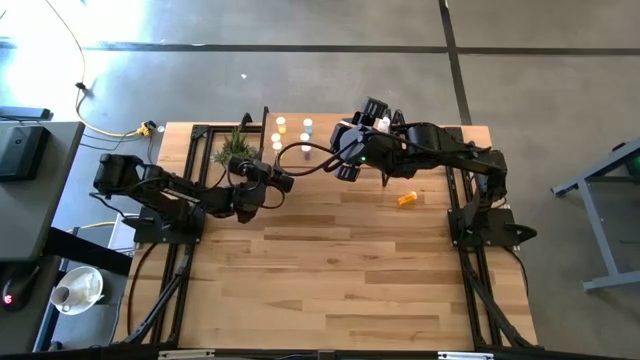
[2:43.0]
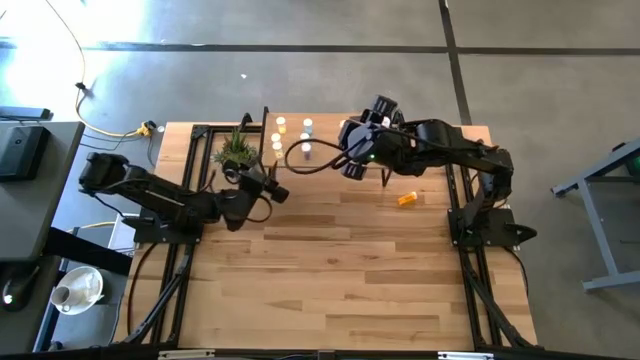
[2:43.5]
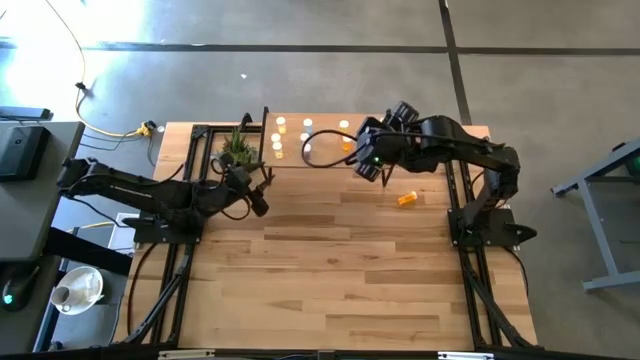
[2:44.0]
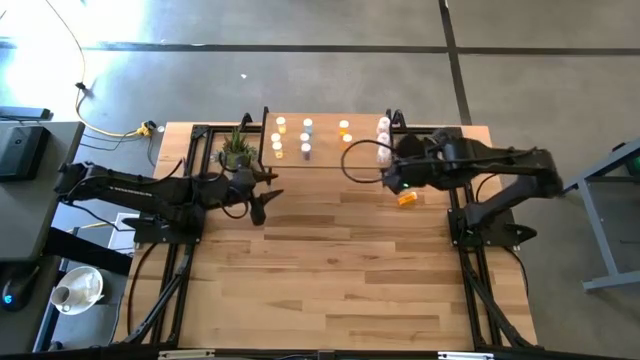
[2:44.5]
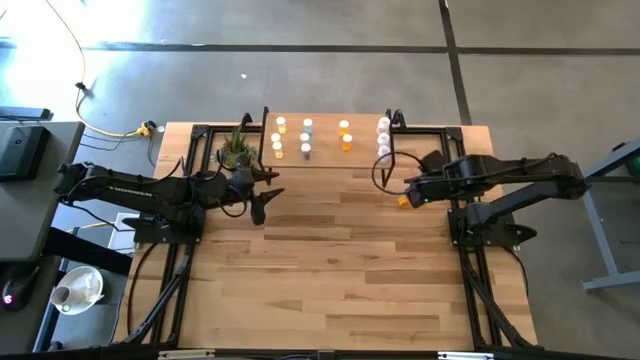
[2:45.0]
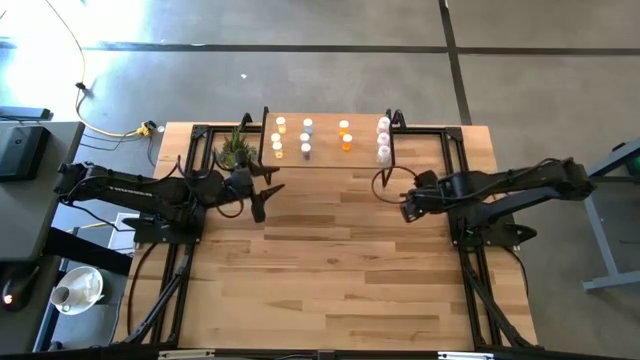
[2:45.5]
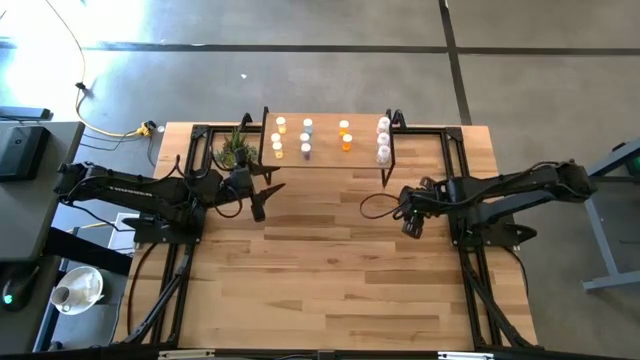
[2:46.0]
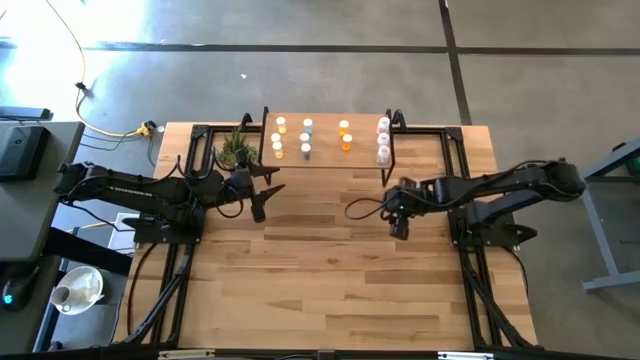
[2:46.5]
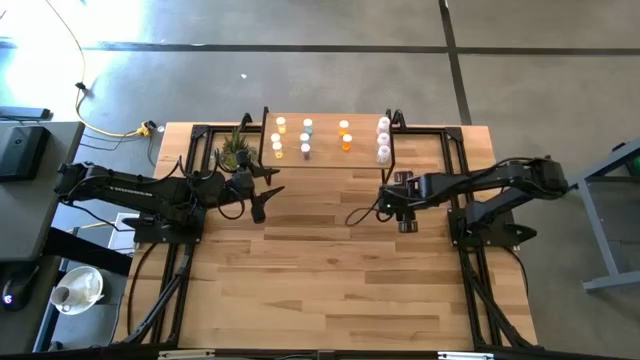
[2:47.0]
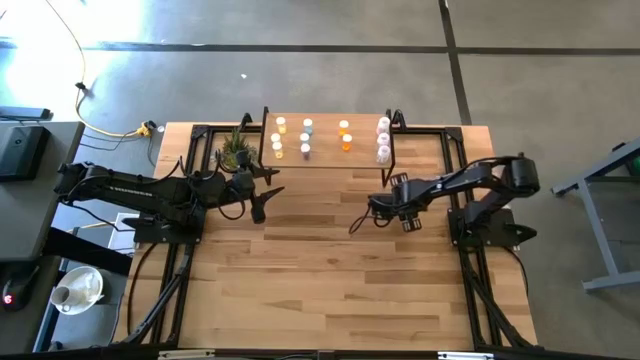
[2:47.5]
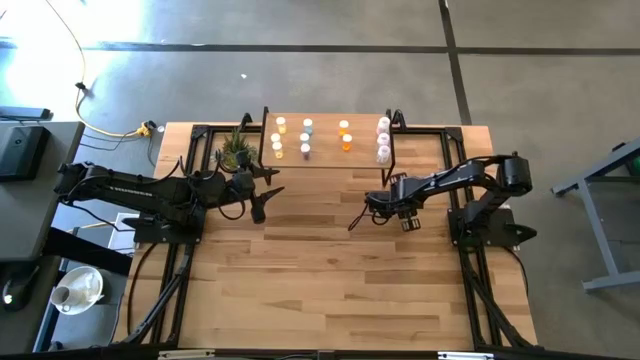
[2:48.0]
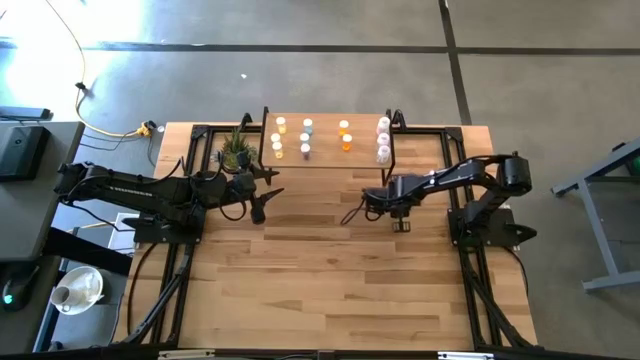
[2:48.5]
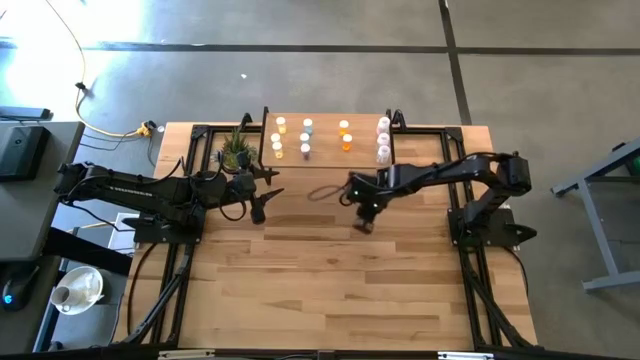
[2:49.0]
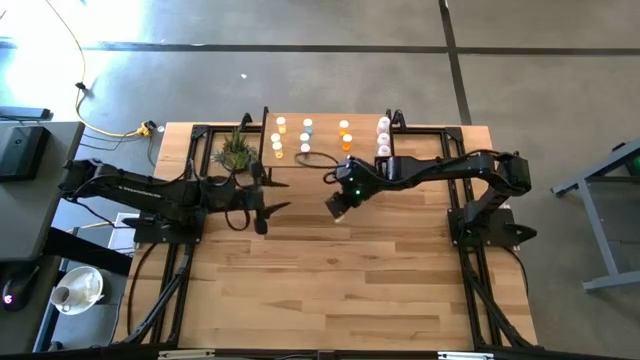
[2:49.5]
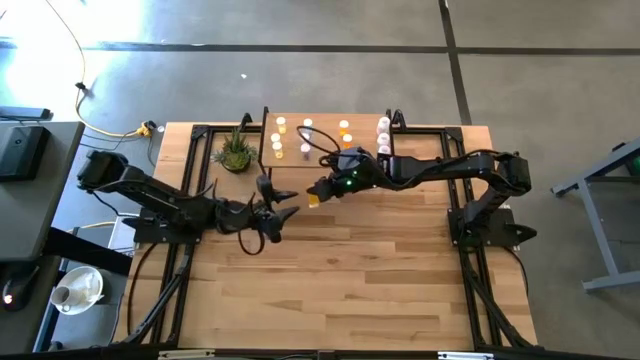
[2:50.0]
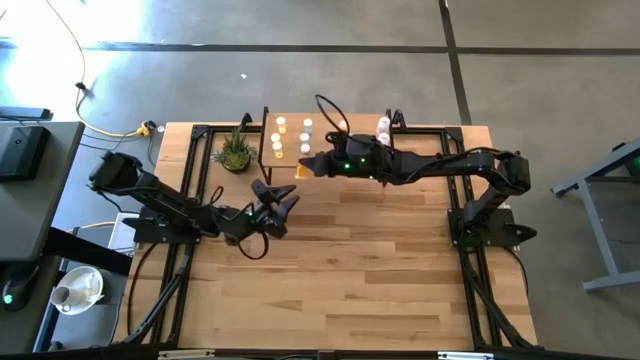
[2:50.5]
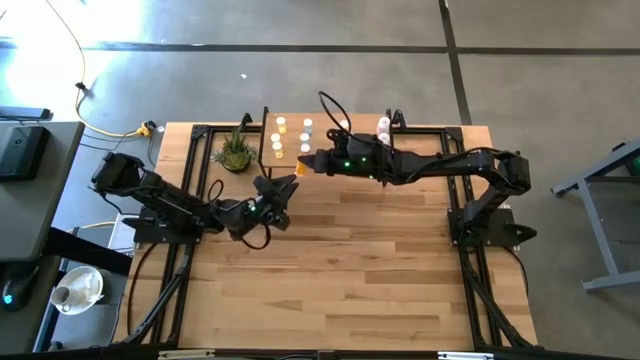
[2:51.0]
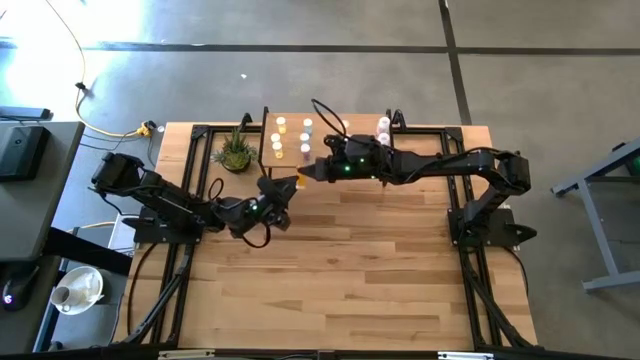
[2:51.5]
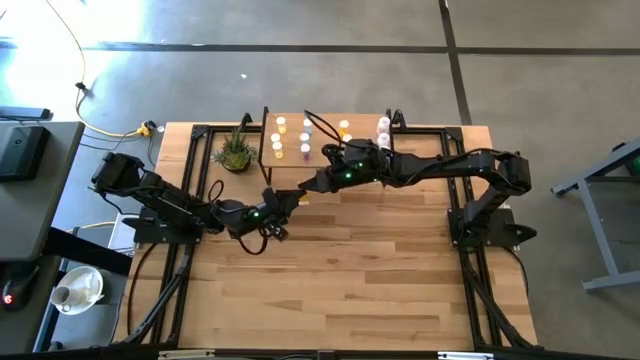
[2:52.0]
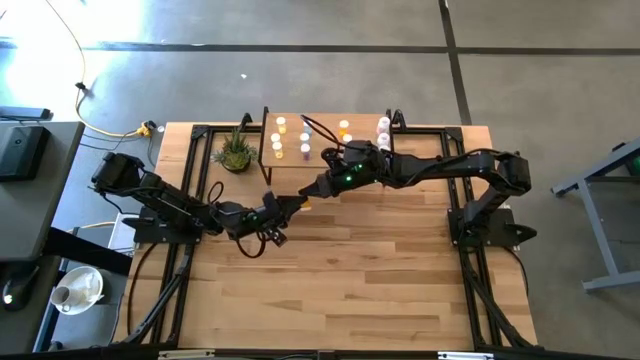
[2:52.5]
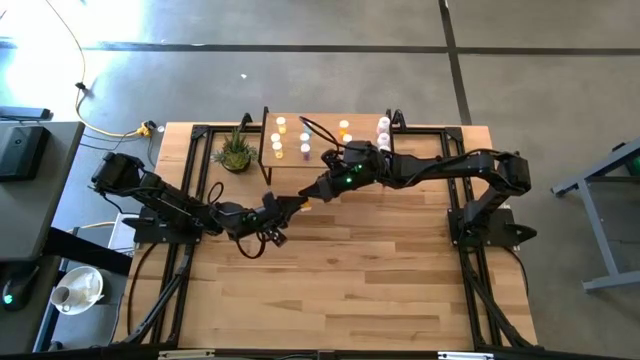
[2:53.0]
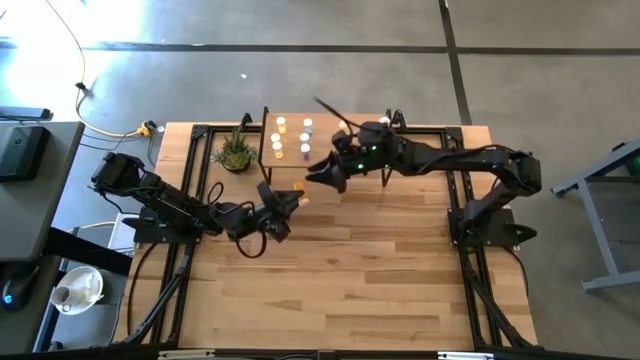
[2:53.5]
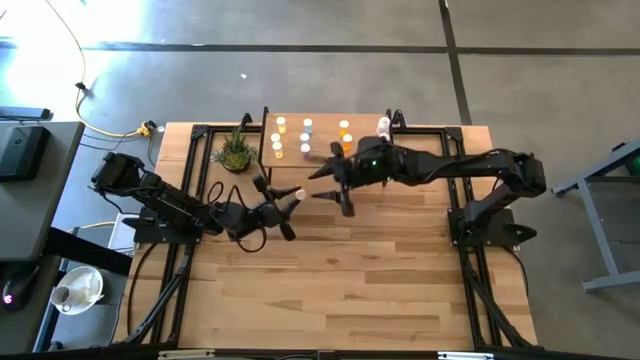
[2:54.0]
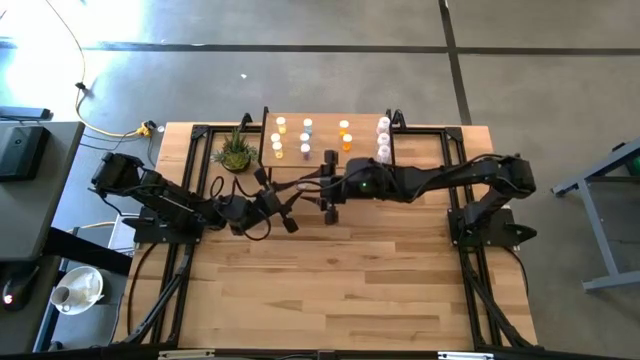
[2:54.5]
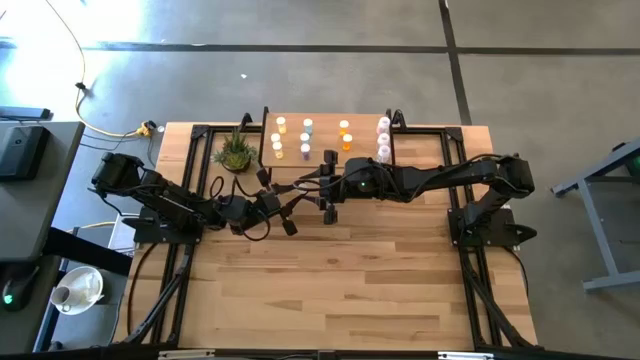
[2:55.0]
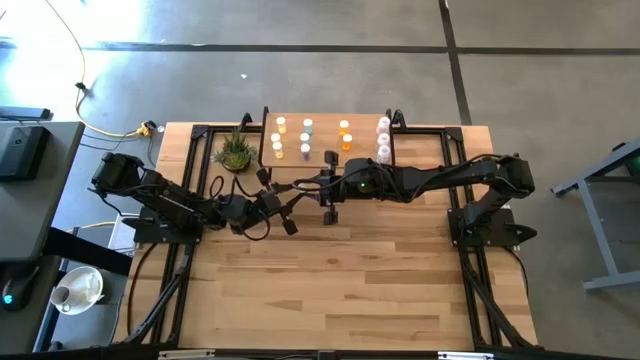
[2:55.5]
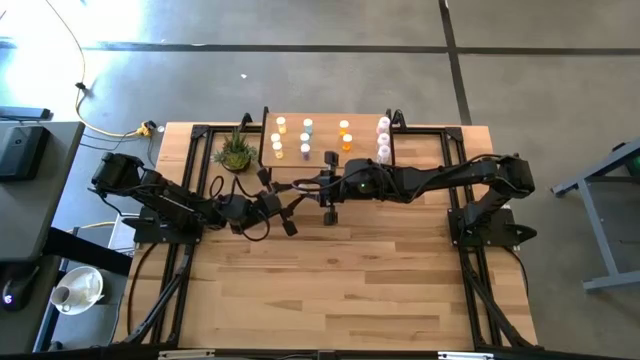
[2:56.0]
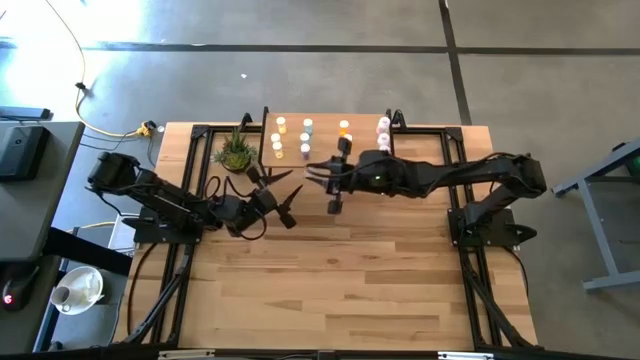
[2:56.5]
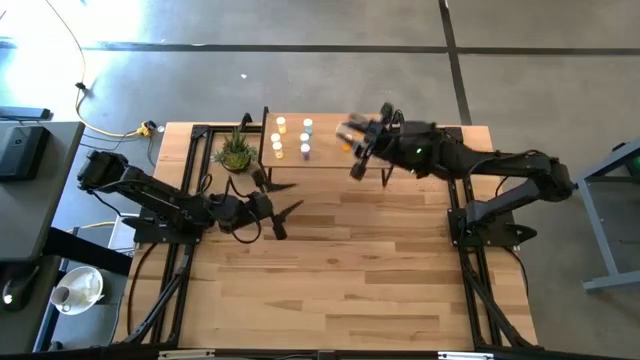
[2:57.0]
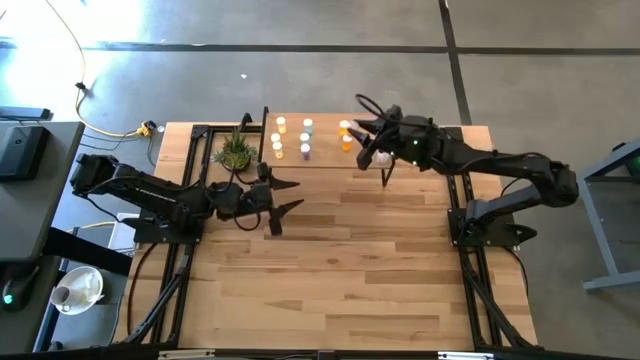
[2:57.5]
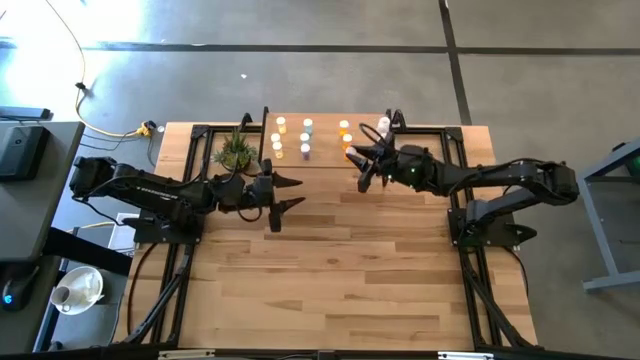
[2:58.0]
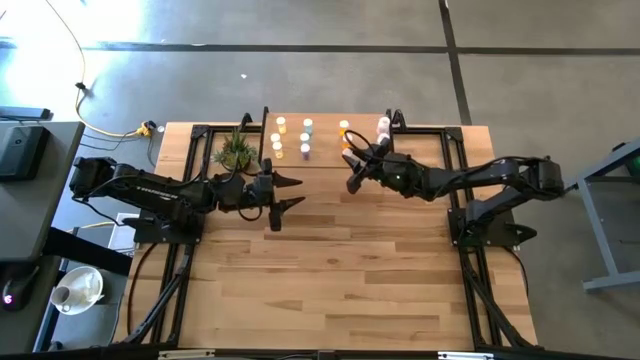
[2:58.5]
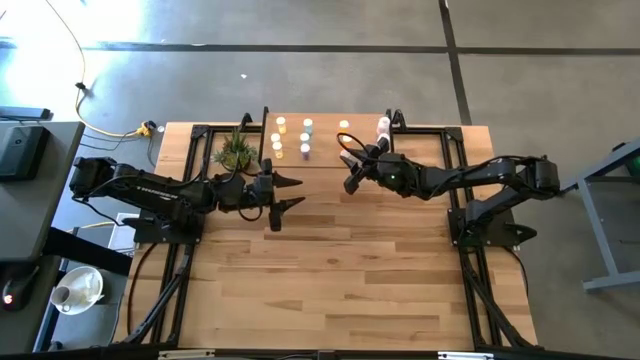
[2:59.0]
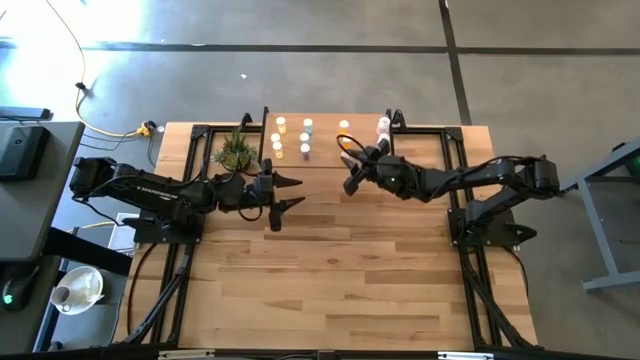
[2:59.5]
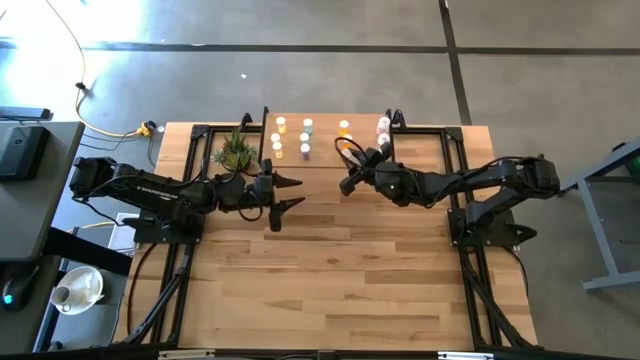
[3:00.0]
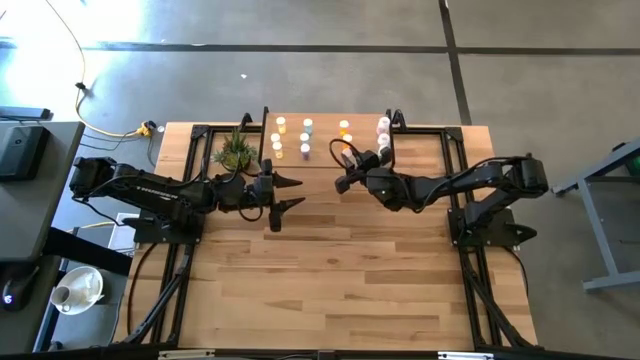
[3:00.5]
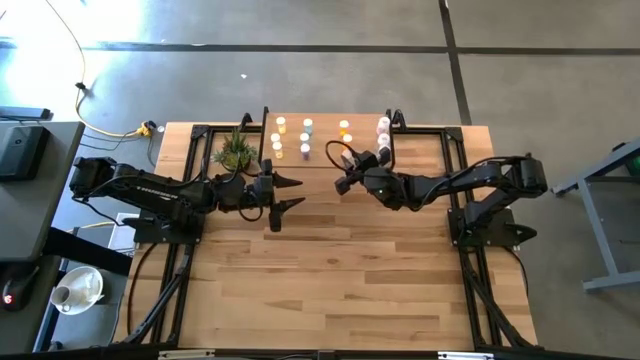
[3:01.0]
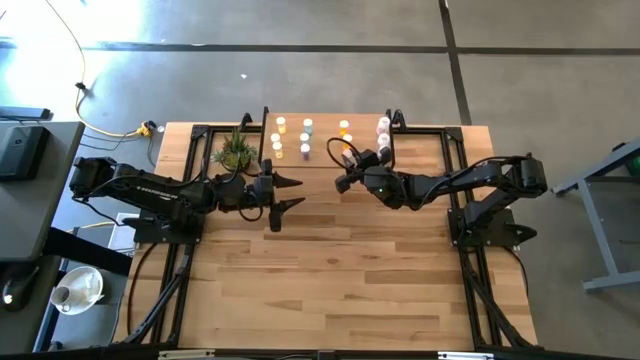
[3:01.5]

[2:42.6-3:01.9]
Task: Pick and place medicine bottles onto shelf by color
Put the orange pill bottle on the shelf aligned with the other orange pill bottle

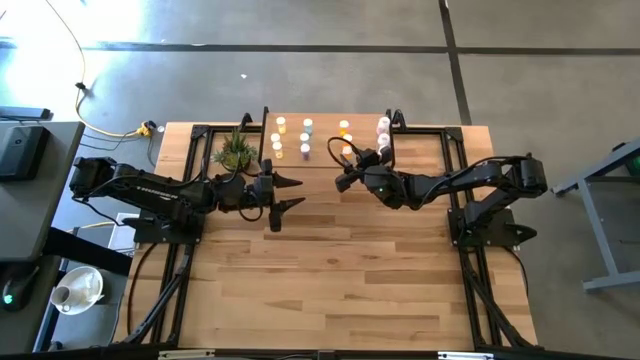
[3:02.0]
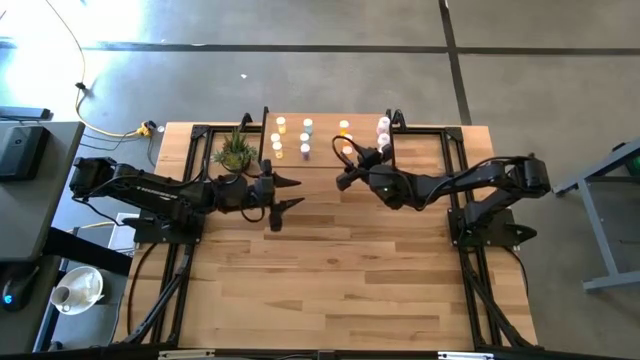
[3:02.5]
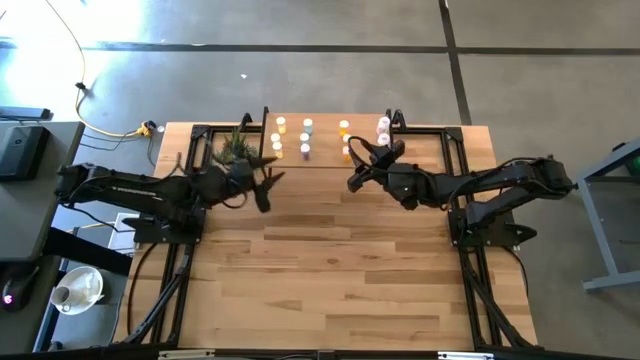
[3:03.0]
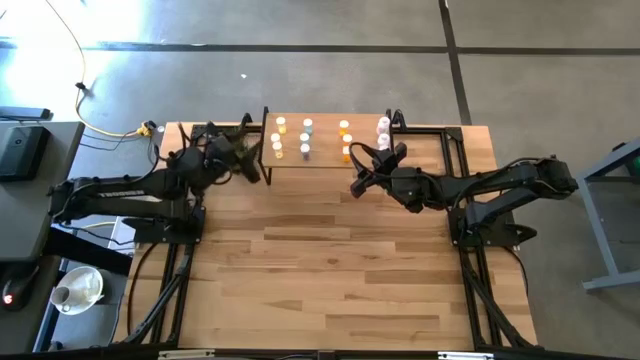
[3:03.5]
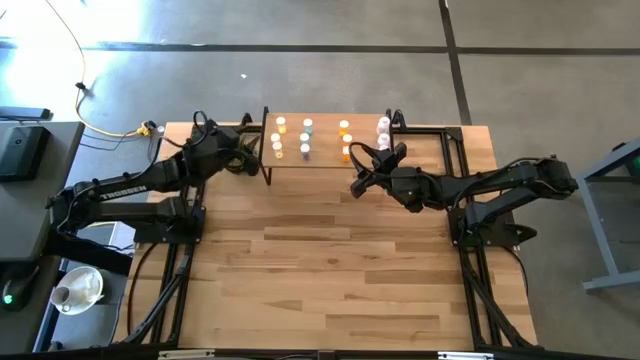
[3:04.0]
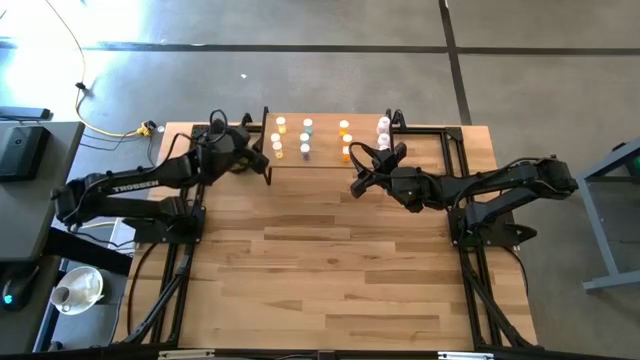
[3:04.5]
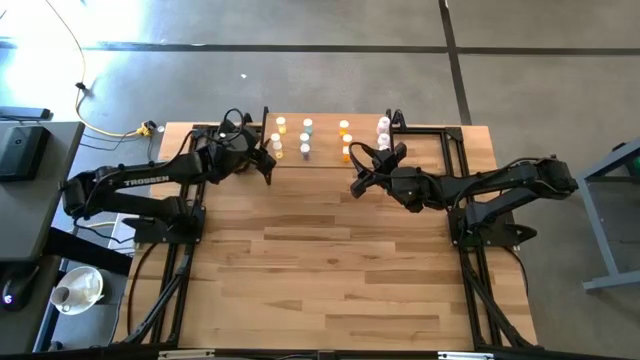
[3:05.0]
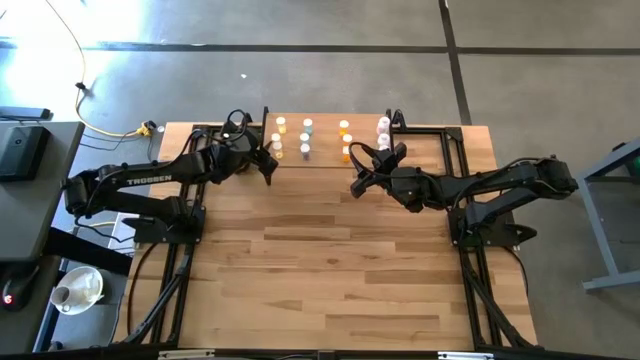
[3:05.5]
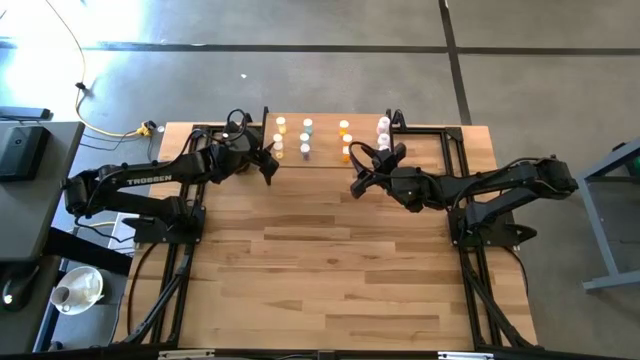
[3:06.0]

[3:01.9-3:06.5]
Adjust the yellow pill bottle on the shelf
